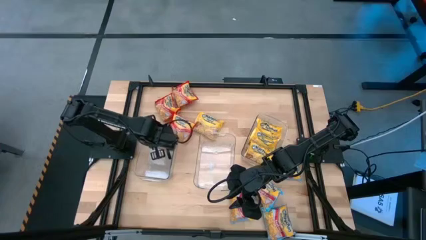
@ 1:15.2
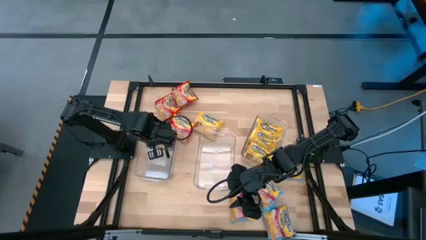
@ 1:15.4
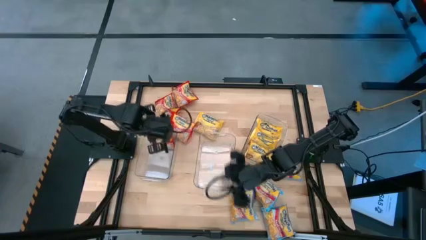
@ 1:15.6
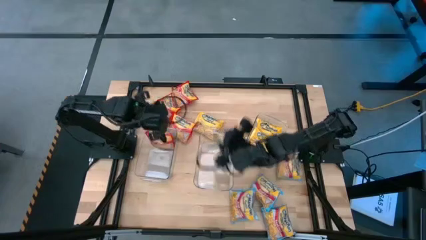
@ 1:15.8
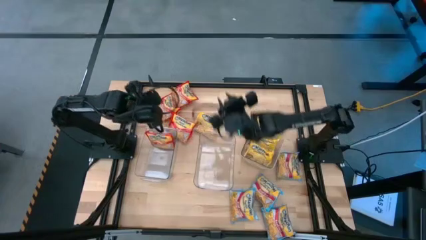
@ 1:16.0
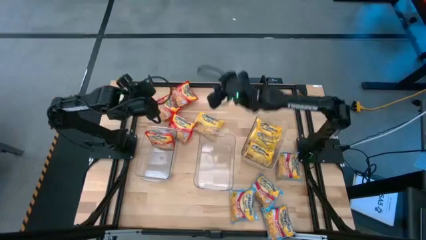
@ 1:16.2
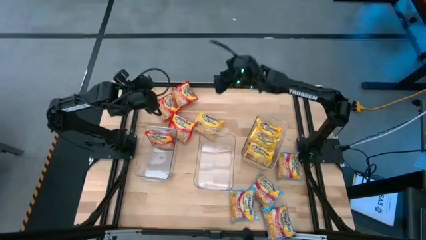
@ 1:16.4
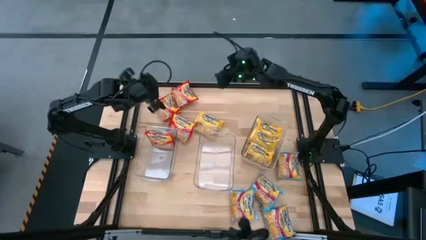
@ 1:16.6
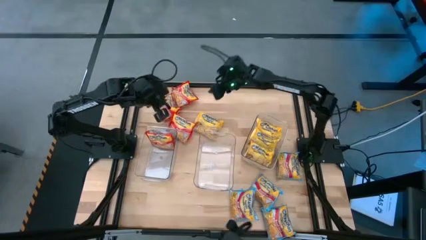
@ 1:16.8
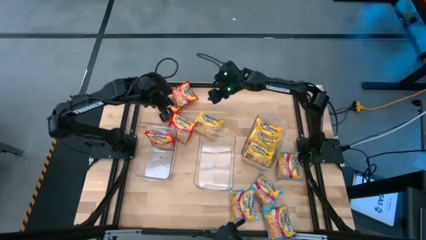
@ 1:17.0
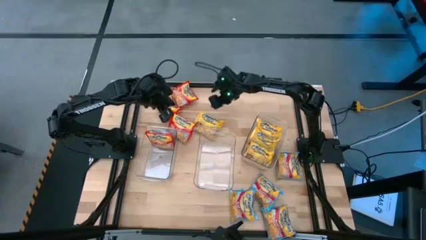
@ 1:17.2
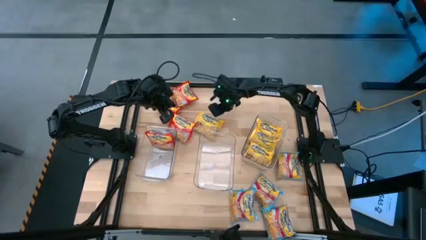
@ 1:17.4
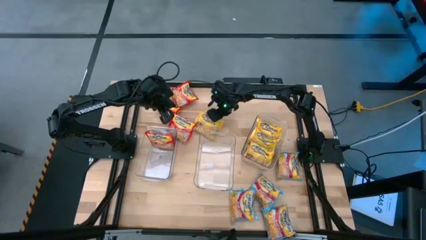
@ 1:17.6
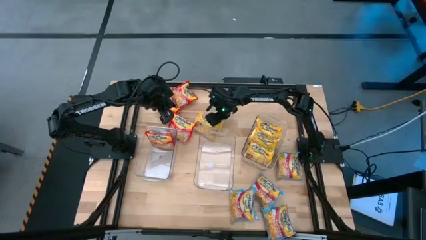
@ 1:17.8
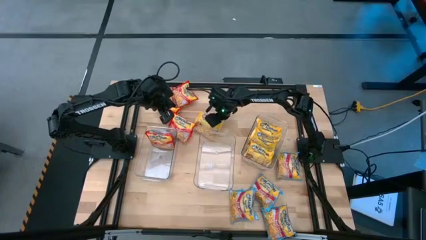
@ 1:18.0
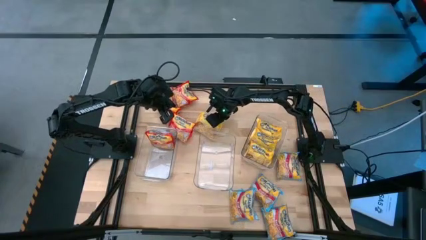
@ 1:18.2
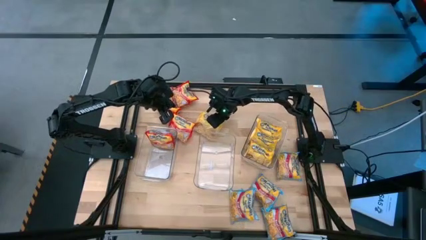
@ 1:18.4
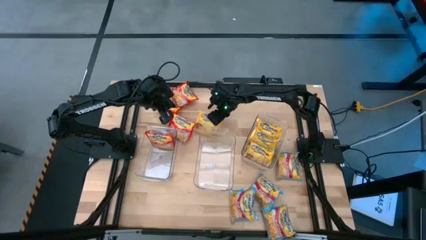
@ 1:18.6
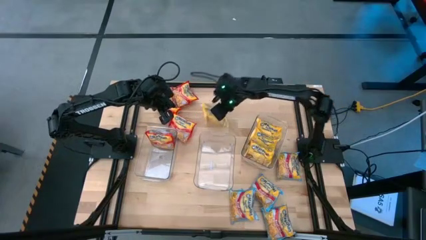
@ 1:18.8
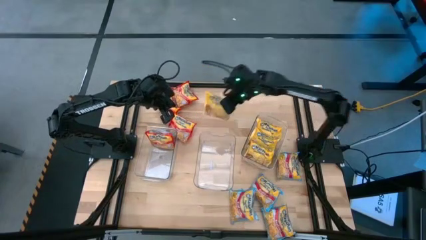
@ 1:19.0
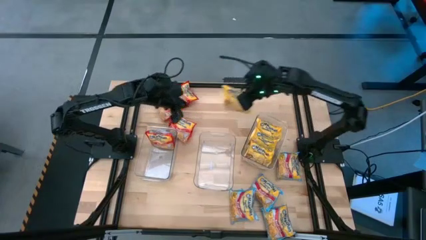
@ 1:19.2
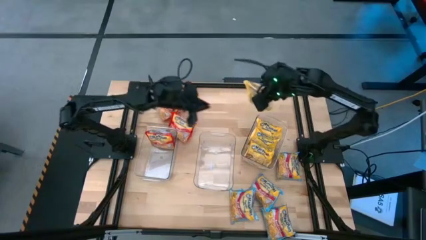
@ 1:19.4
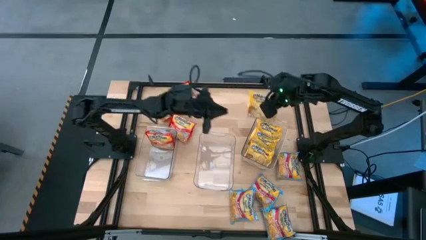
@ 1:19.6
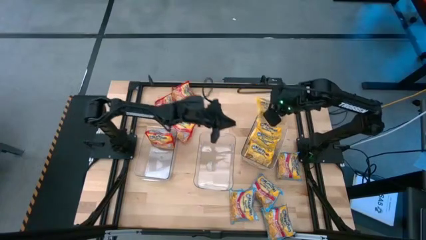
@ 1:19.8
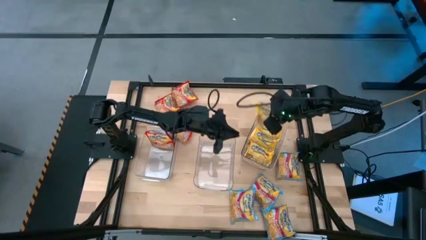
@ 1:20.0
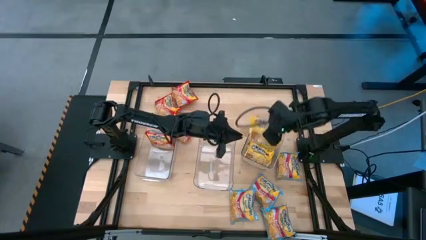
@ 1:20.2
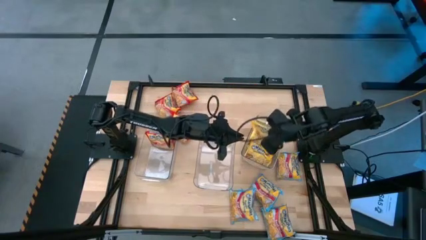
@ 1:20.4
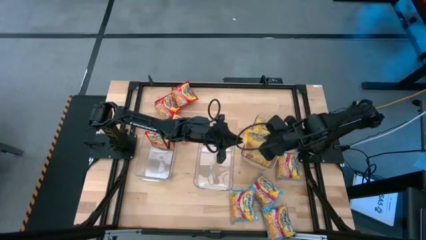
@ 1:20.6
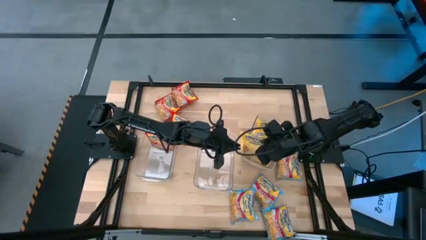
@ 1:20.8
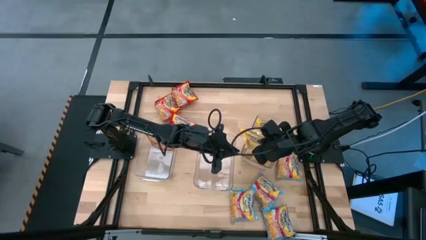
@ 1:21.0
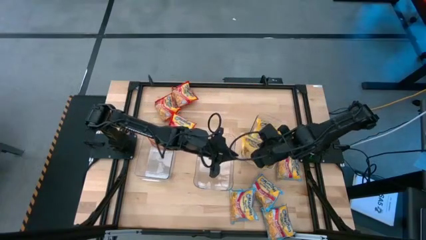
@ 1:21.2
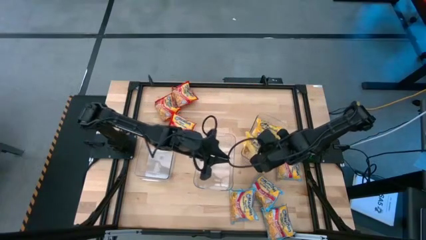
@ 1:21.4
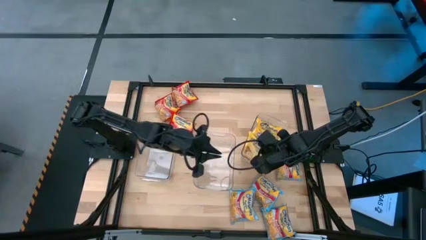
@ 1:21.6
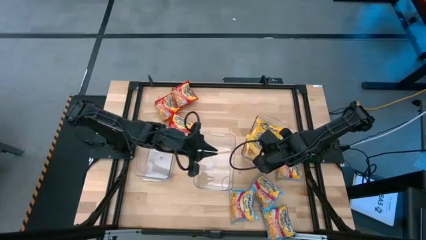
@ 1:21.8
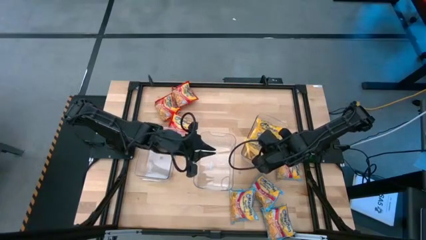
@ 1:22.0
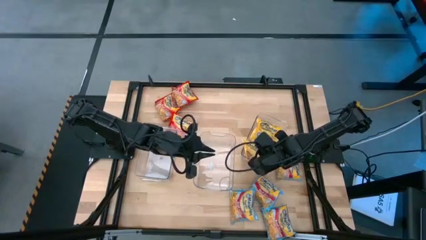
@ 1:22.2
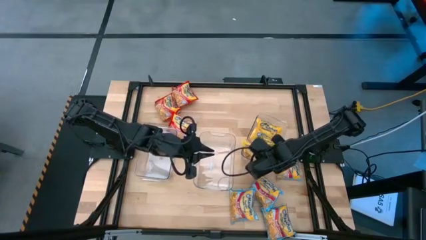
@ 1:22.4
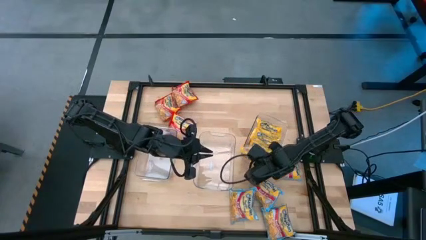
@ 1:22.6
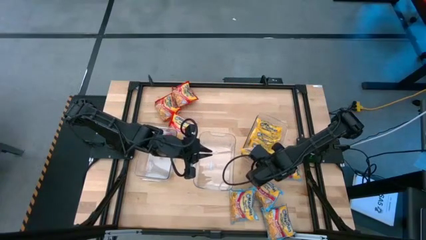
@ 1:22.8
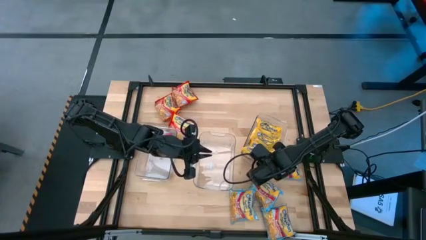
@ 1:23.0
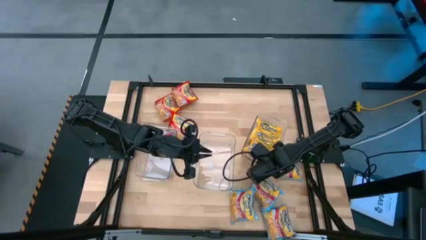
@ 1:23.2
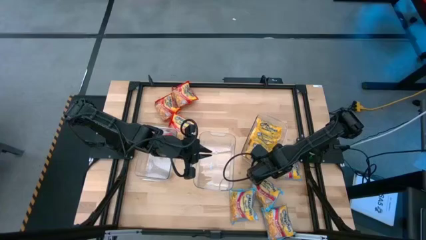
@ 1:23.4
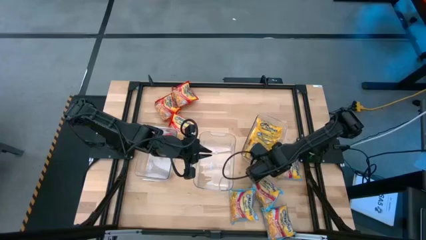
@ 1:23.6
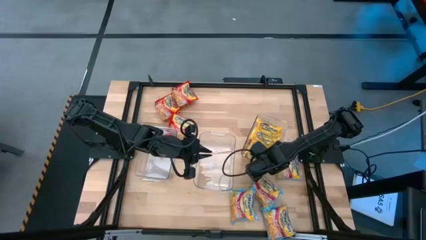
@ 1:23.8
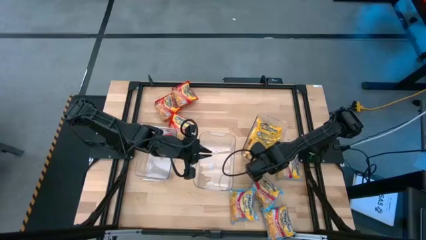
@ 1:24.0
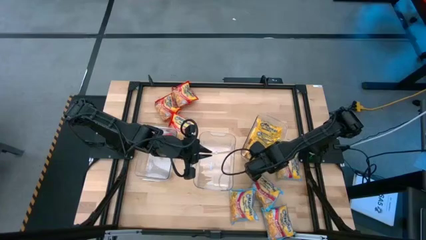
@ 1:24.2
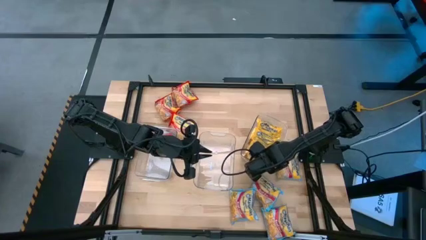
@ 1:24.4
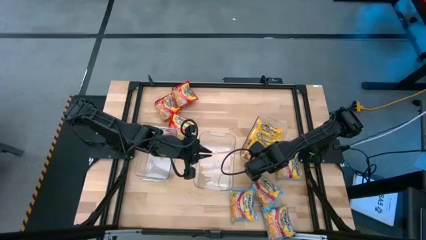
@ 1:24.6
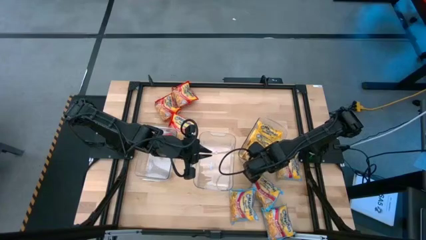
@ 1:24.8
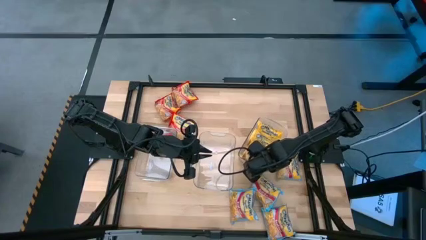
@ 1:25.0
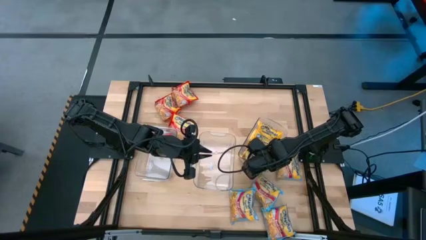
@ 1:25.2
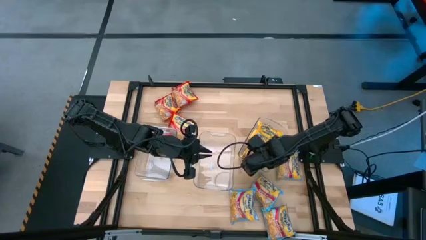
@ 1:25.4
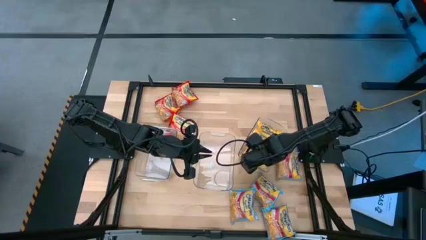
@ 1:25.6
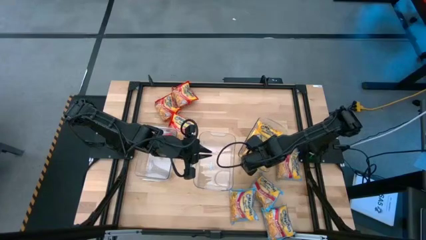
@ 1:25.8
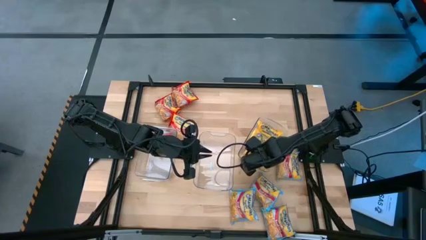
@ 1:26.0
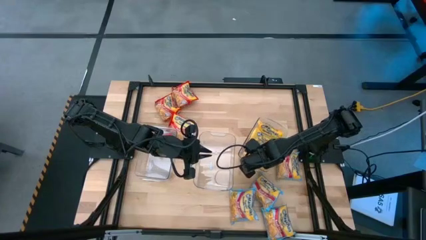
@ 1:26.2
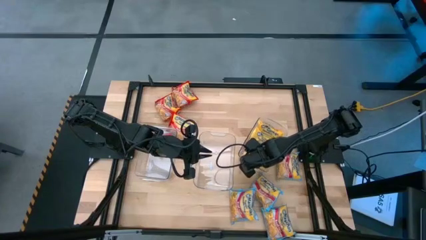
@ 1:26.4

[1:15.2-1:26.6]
Task: Sort Maruchan noodles
Put the yellow noodle pack into the right transparent bin

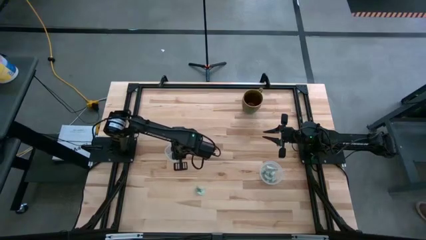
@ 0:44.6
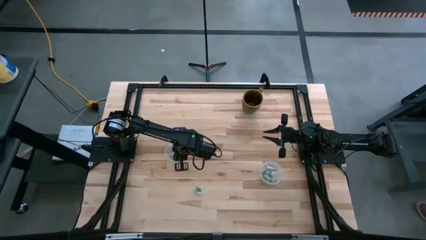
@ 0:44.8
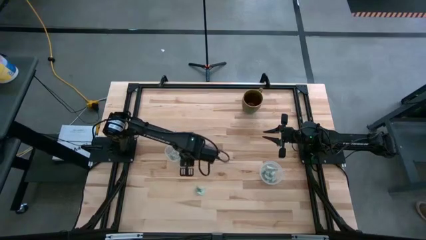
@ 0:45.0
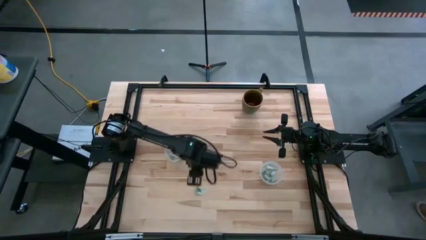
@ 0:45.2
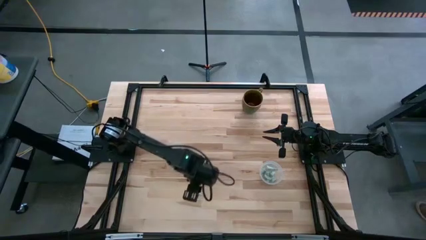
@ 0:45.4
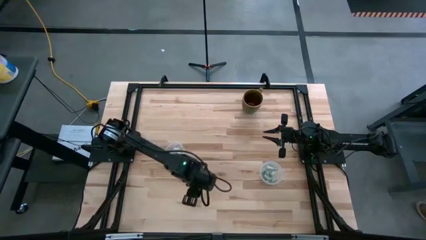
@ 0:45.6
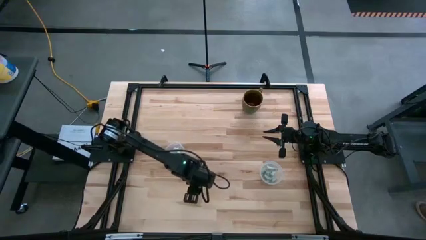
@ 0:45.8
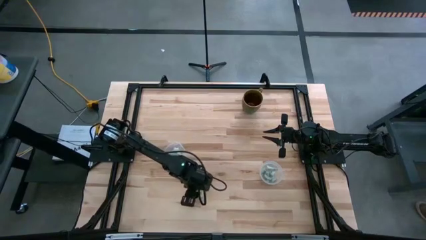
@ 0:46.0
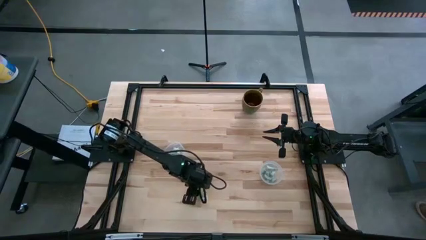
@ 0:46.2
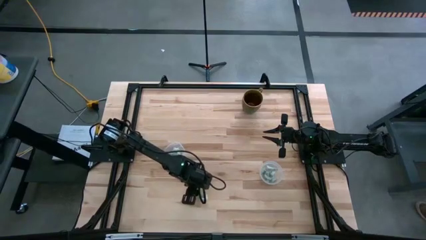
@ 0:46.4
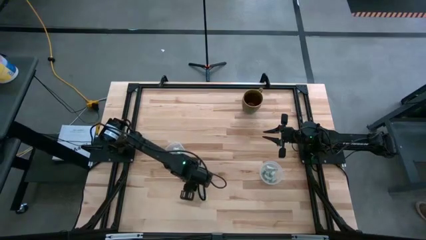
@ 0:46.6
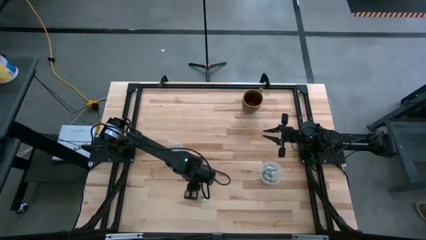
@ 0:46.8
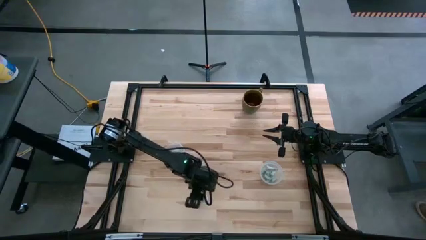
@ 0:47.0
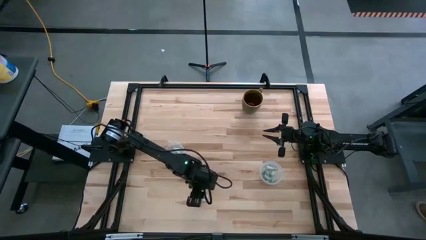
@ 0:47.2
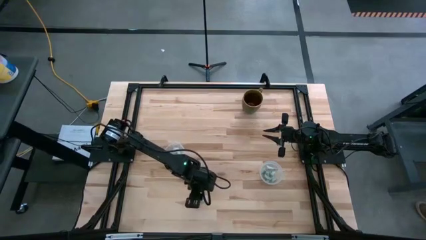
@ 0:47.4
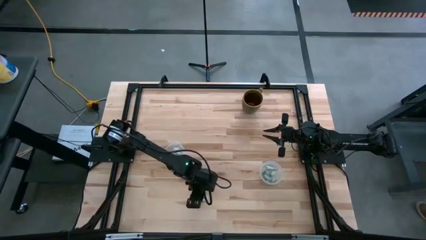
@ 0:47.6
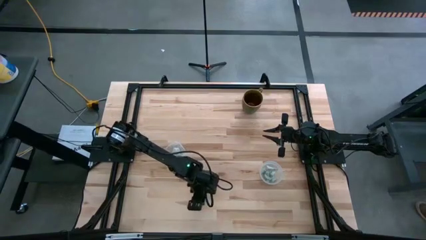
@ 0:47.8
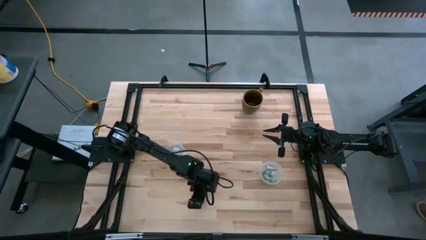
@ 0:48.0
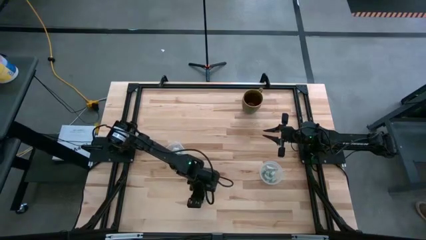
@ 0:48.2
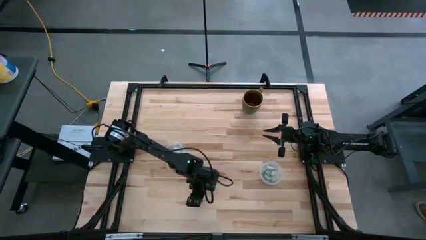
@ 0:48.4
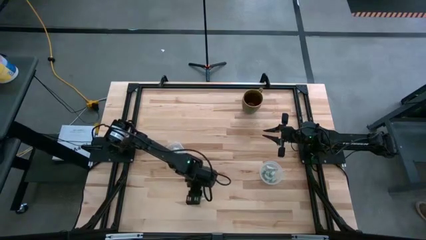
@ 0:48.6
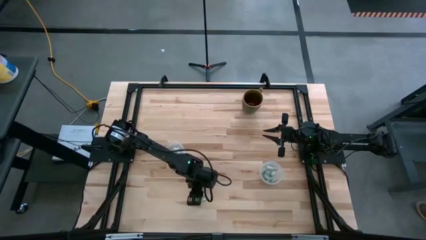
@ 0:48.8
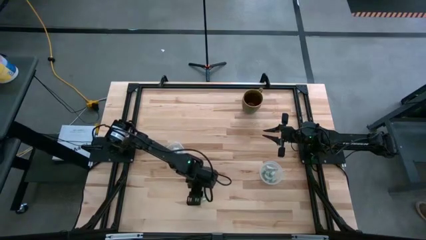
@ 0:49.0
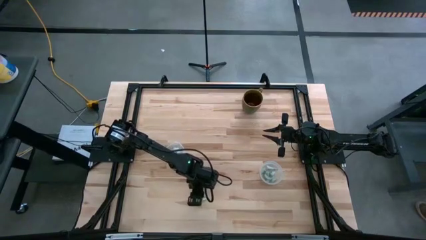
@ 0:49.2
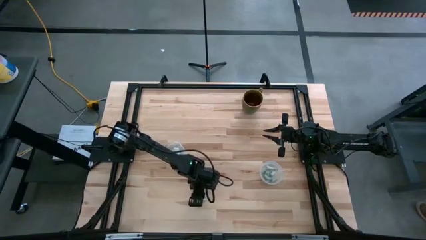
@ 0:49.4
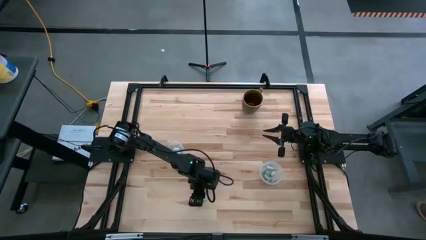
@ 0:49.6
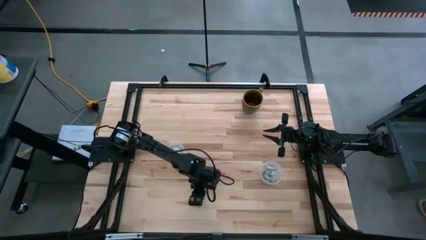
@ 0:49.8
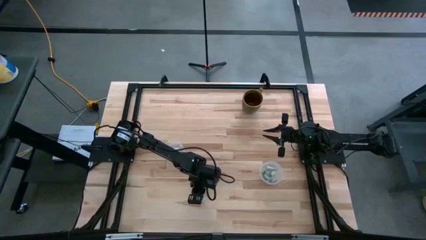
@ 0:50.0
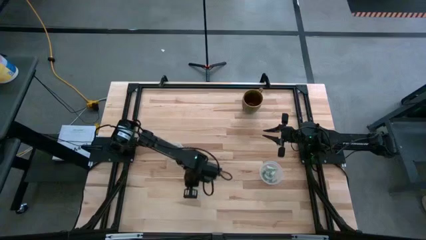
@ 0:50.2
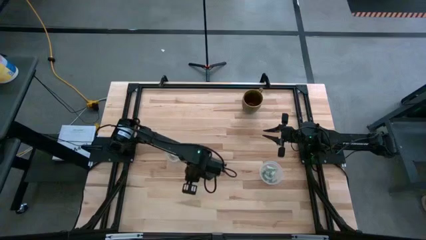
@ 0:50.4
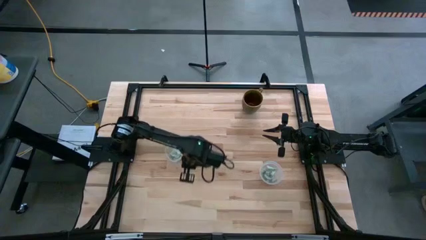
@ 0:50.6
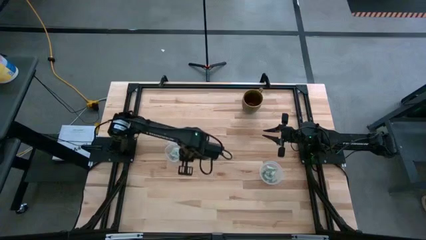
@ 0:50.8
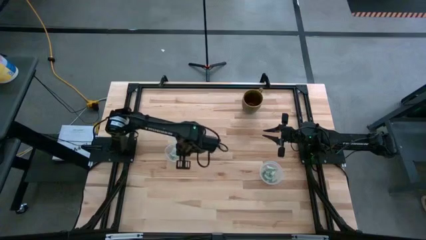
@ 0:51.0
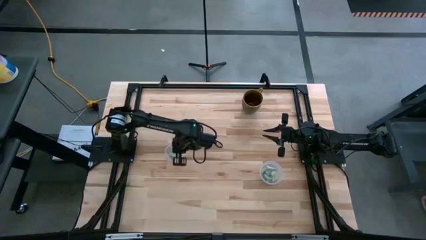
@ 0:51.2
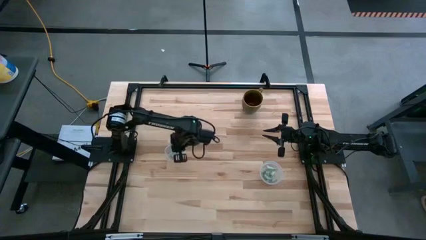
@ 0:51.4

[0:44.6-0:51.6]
Task: Pick and place Stevia / Truvia into bins
Put the stevia packet into the square transparent container
